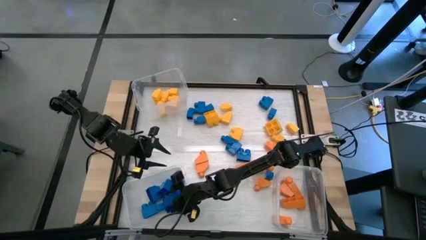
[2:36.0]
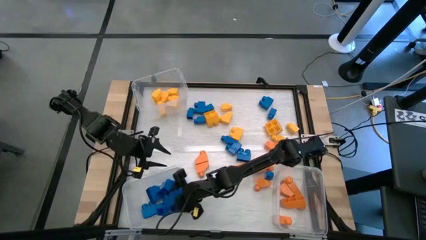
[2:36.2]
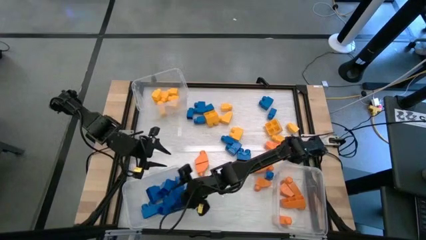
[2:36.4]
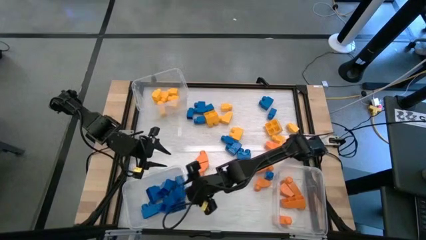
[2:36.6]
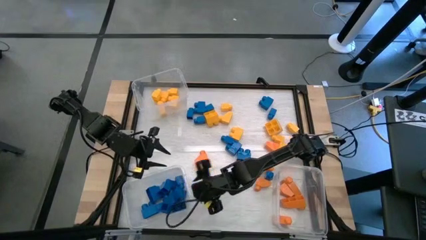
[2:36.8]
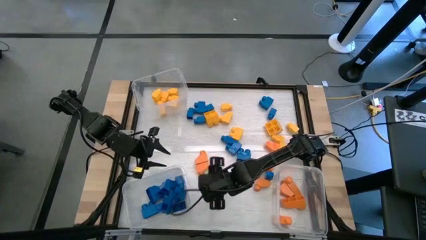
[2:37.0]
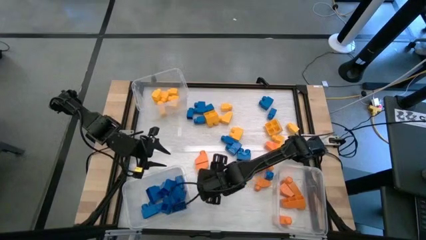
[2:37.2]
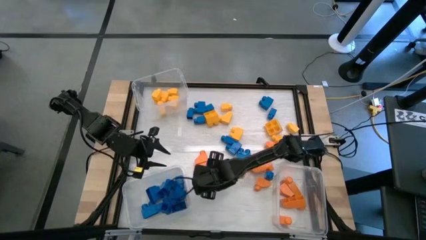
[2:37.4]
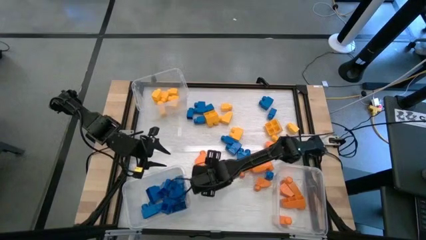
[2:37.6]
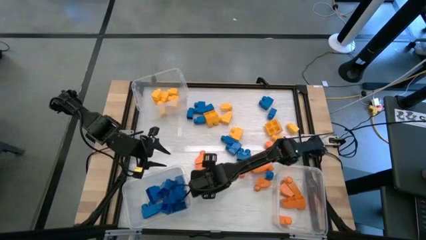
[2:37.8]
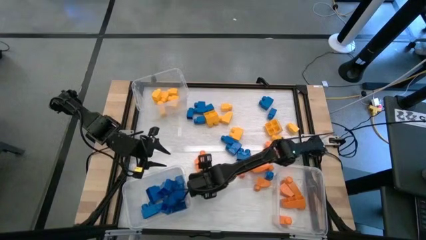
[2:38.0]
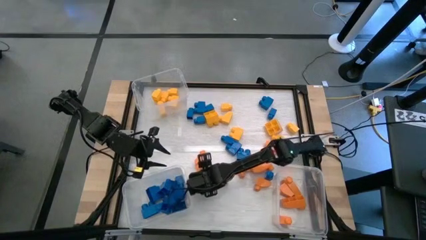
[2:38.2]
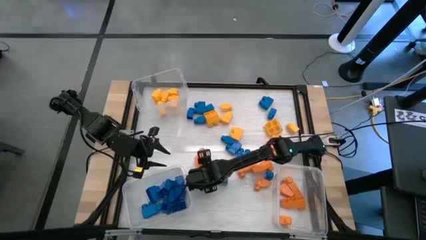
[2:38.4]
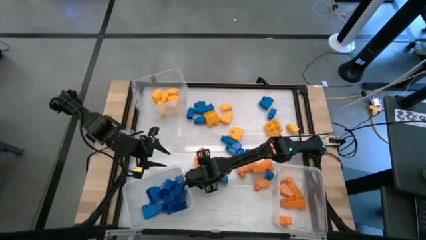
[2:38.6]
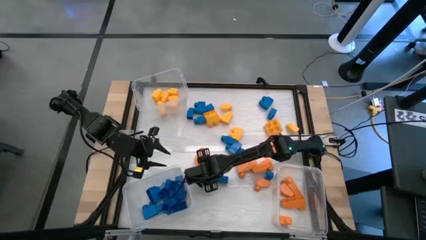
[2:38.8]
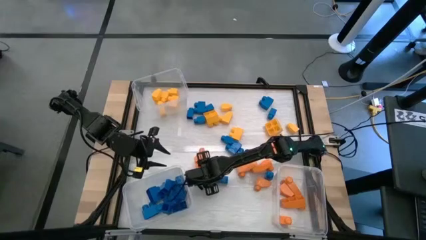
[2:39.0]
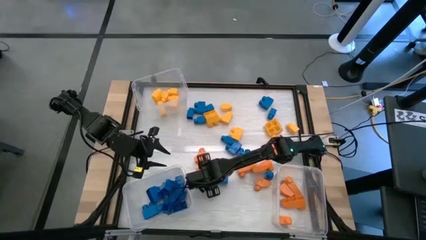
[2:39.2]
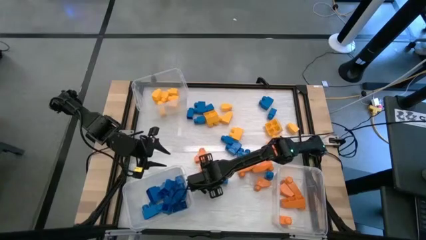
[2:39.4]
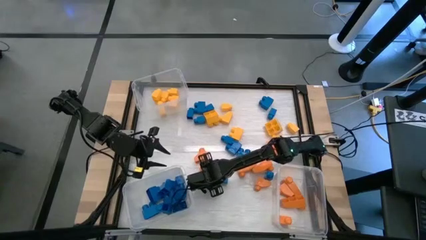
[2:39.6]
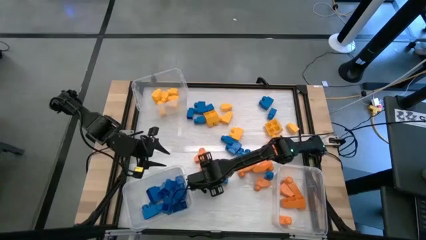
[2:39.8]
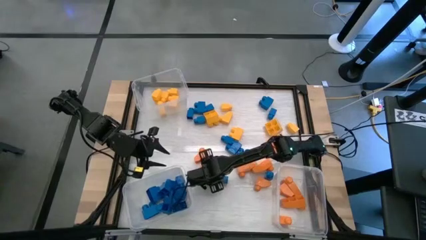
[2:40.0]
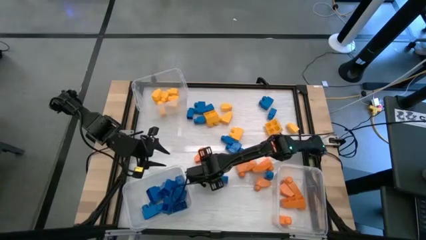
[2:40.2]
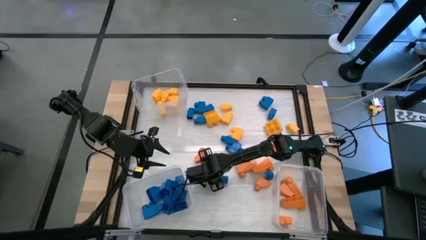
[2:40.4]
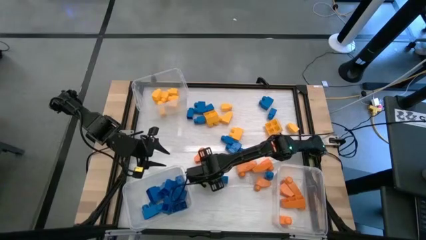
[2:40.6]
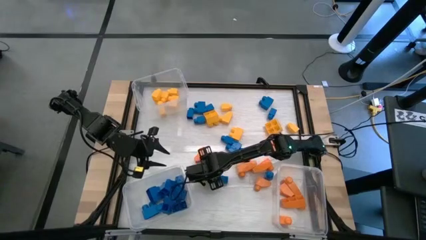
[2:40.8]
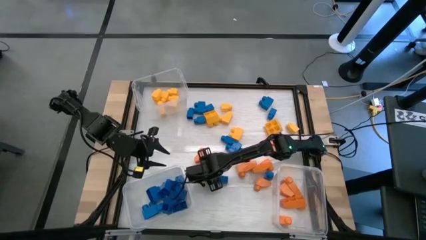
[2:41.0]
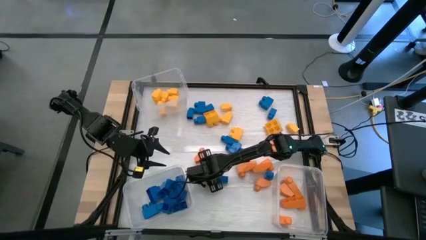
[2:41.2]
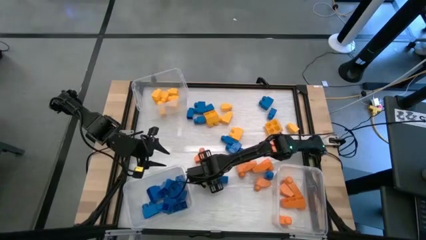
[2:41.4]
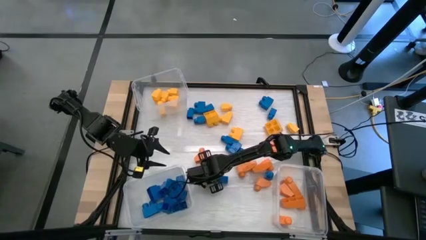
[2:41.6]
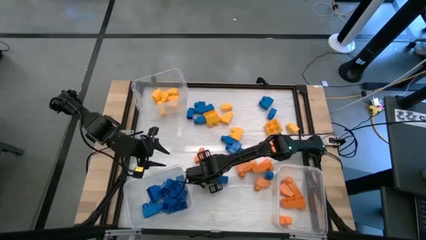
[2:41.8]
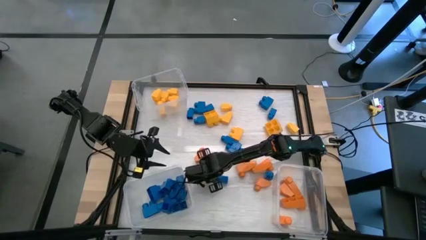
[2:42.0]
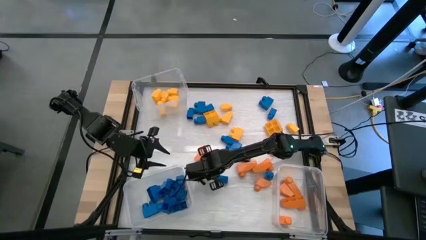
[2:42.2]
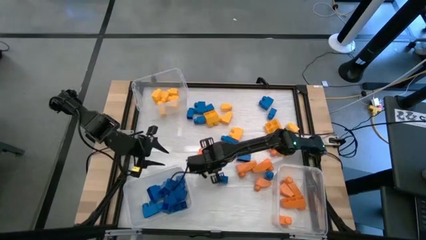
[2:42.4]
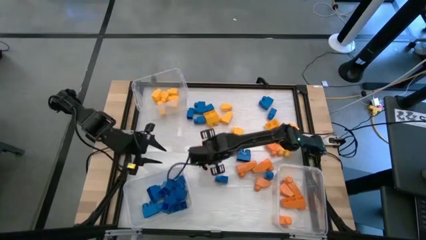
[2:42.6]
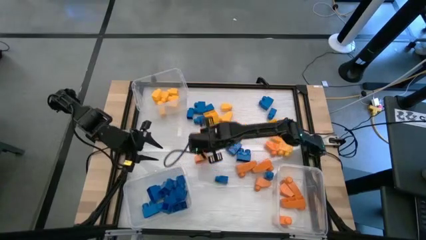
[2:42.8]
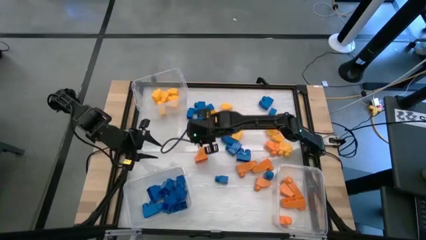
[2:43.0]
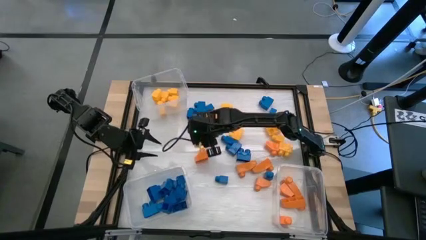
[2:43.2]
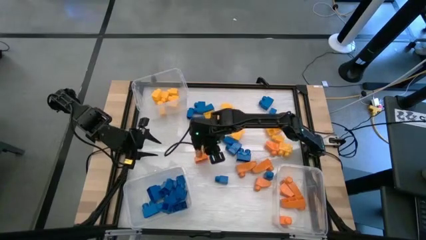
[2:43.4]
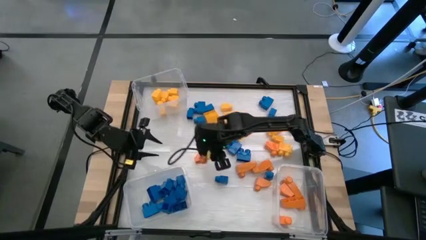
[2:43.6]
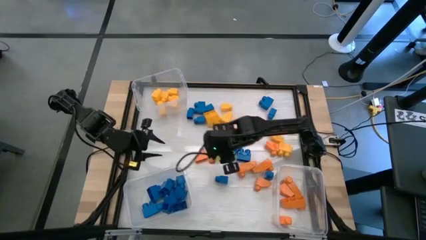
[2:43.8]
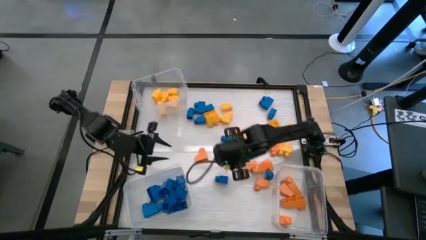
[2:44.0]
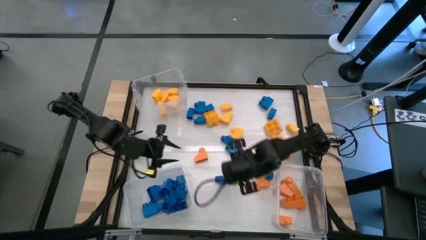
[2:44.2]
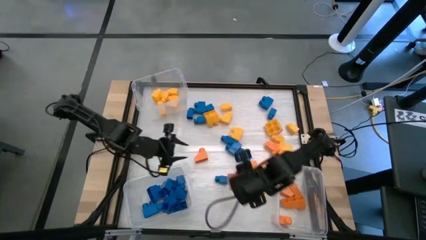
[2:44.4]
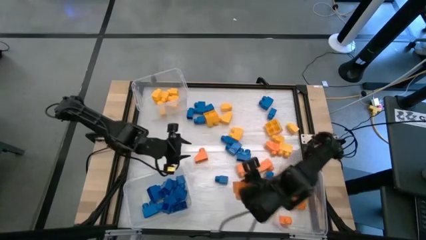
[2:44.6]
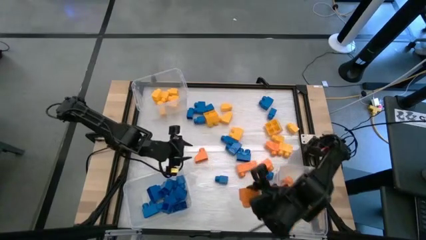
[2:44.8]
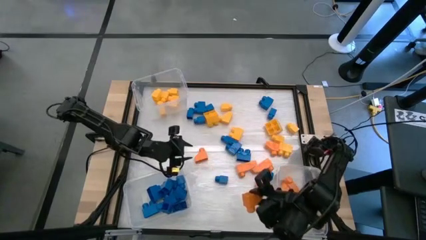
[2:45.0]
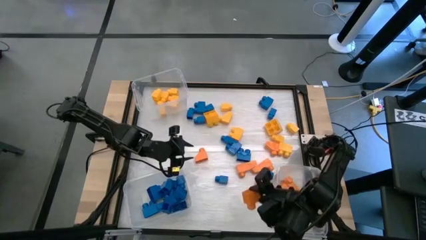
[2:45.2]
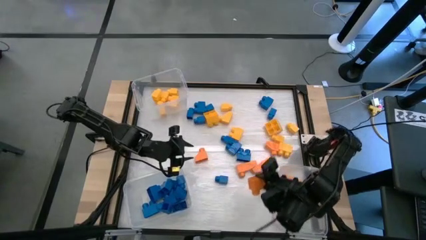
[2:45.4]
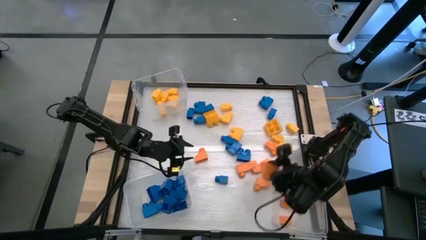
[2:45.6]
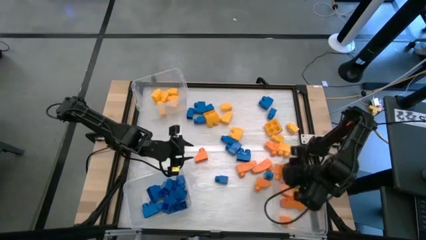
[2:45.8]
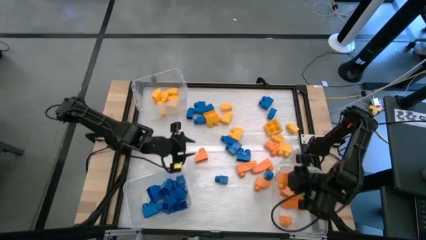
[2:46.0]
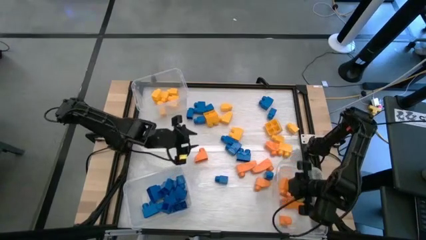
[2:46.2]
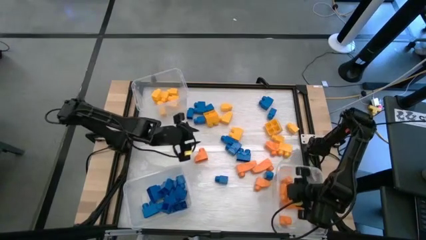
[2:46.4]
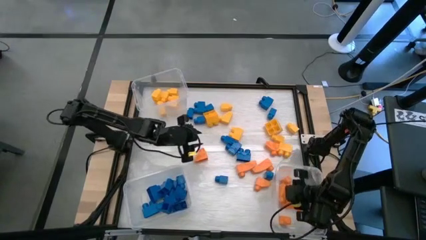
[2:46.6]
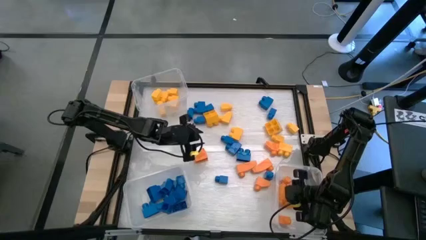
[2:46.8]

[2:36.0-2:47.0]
Task: Sort blocks
Put the orange game piece into the bottom right transparent bin

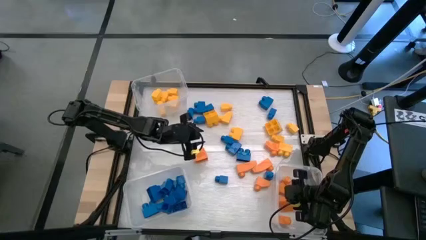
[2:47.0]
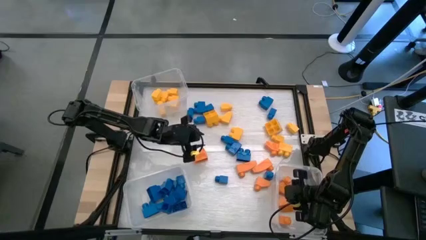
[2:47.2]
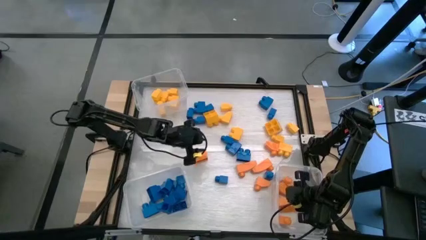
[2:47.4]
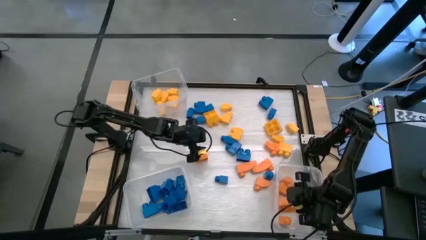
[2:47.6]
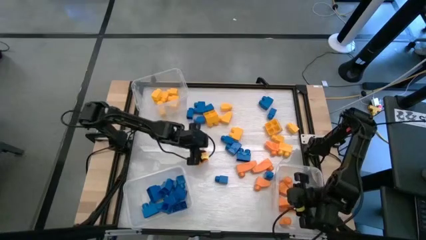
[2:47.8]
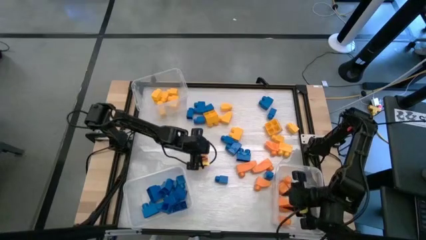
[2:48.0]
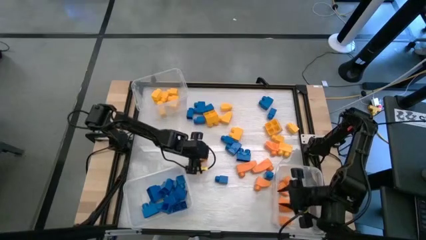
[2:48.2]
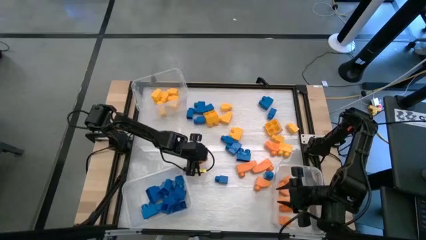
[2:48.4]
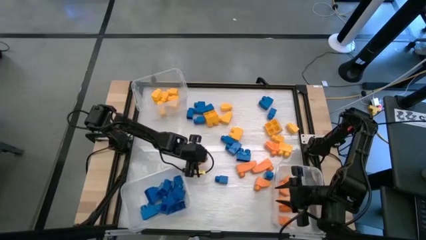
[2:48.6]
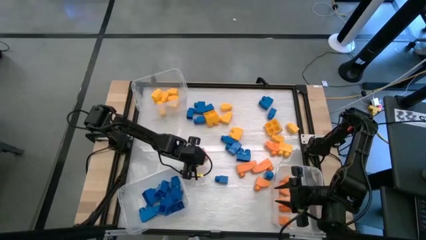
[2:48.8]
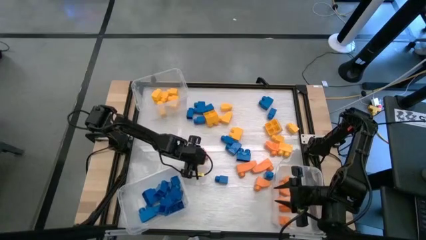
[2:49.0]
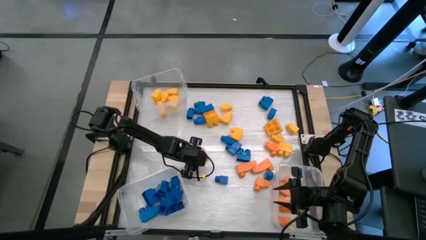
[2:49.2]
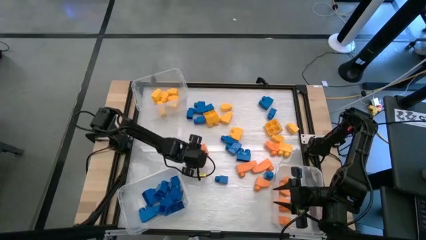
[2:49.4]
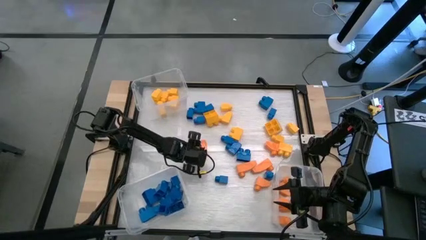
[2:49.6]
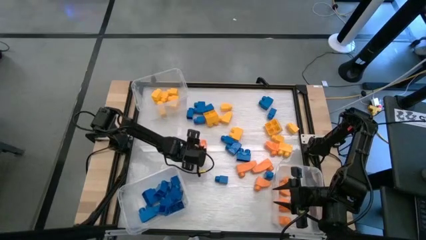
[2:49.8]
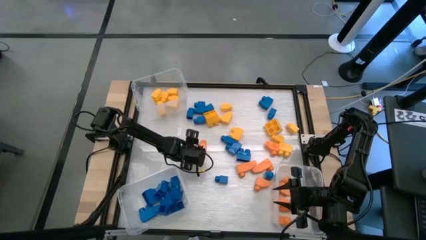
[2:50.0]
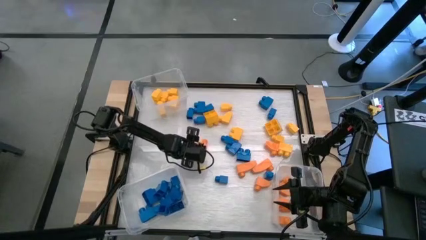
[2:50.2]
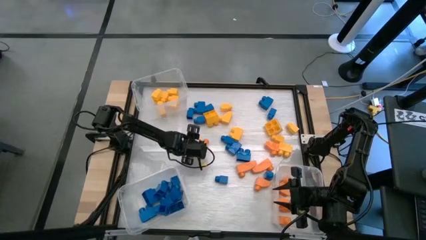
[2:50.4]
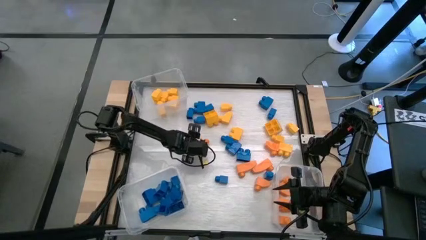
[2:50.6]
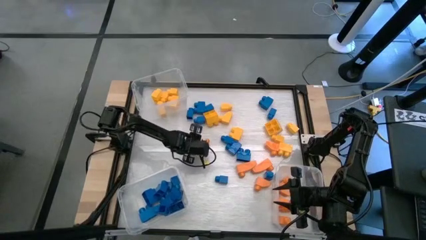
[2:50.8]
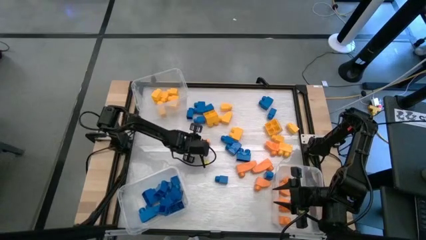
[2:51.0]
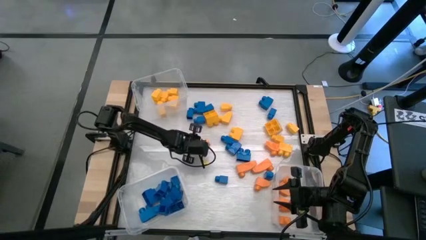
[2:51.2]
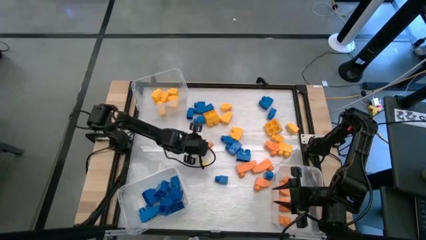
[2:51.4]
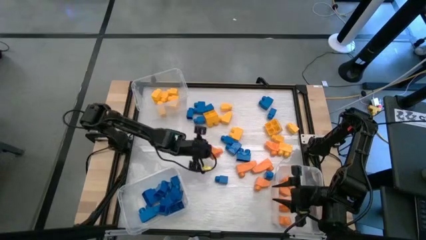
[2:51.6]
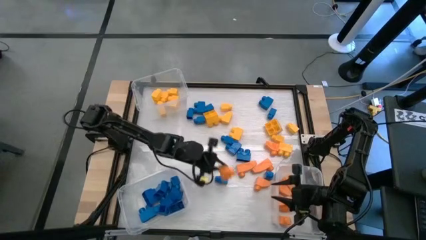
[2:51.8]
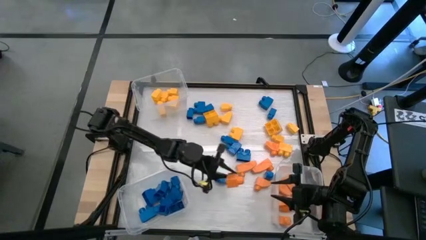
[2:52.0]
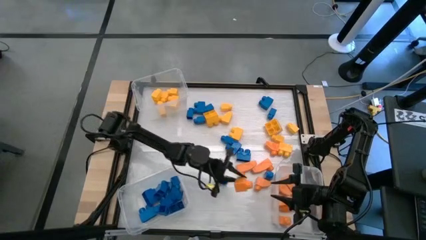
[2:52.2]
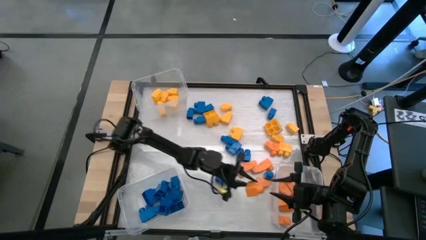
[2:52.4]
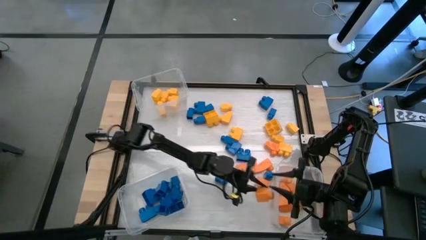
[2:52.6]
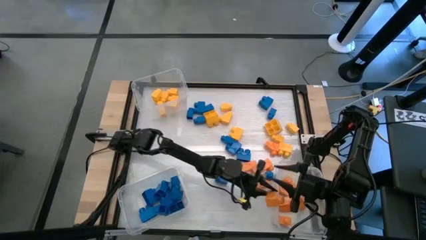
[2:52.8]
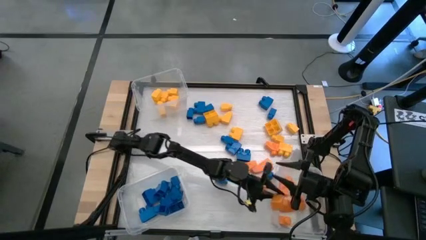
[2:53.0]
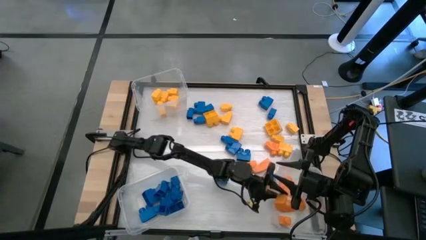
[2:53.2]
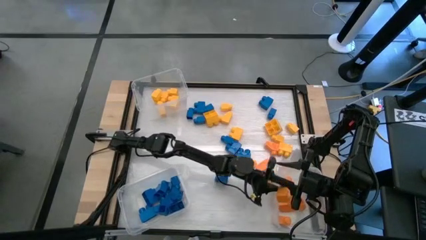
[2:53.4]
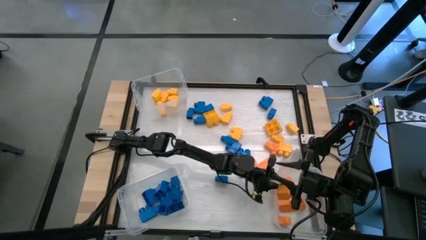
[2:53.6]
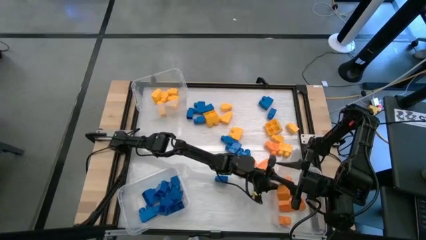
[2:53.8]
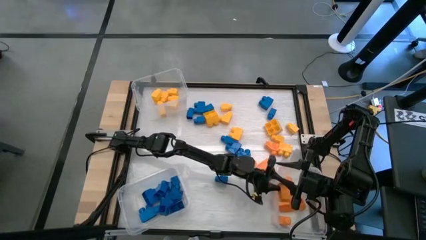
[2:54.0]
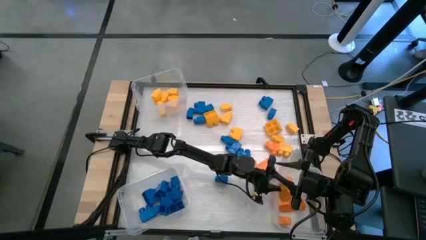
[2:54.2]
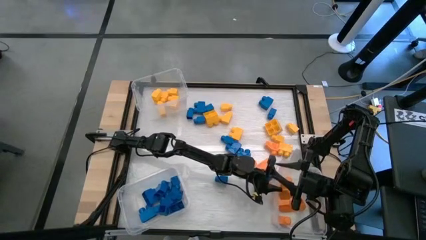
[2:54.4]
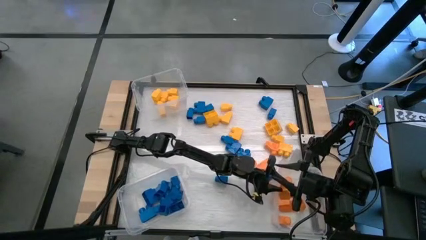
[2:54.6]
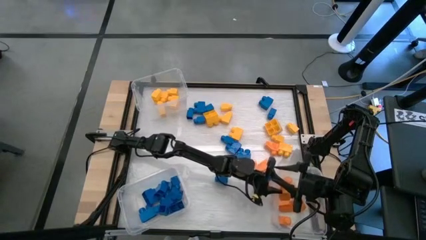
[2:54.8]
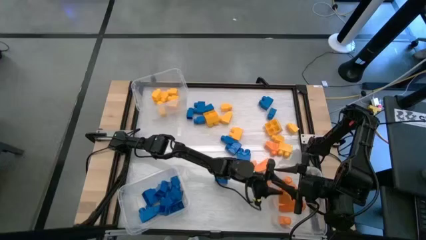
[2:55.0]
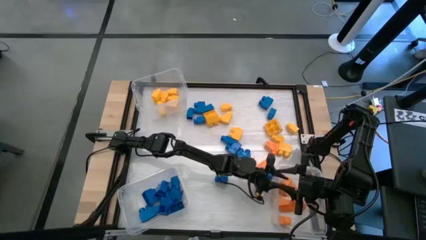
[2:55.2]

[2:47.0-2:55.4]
Put the orange game piece into the bottom right transparent bin
